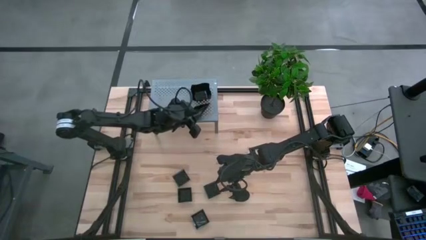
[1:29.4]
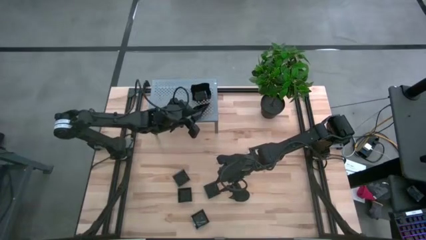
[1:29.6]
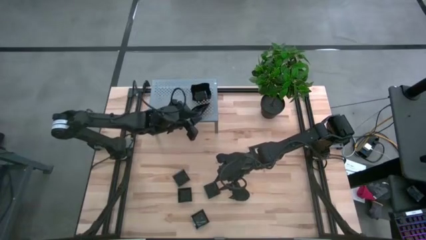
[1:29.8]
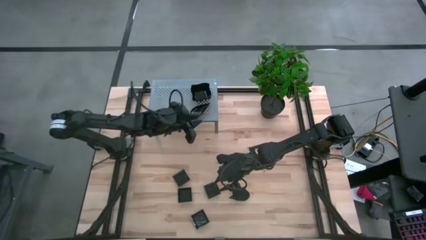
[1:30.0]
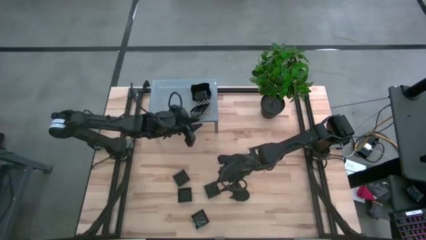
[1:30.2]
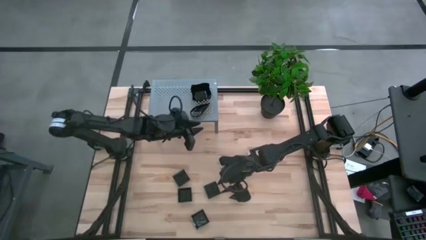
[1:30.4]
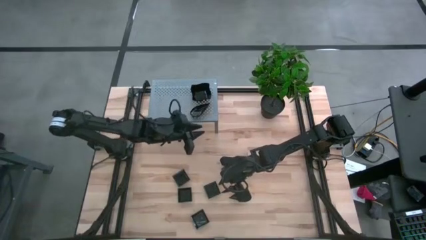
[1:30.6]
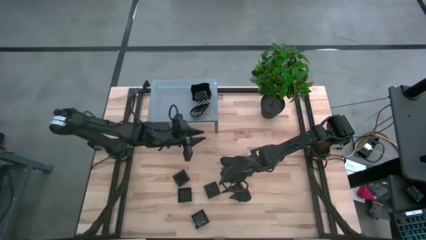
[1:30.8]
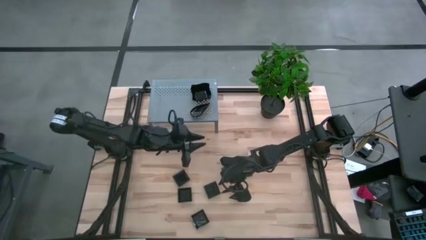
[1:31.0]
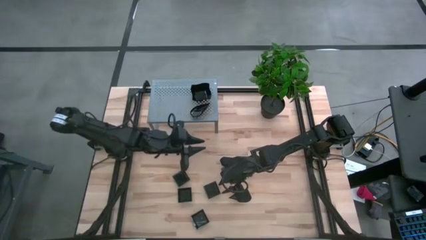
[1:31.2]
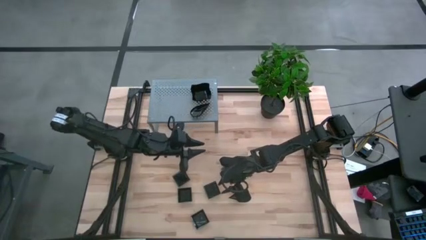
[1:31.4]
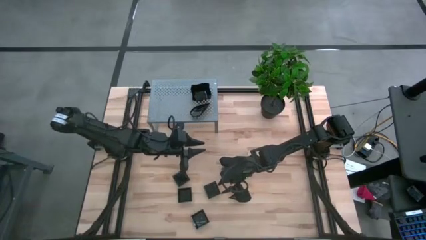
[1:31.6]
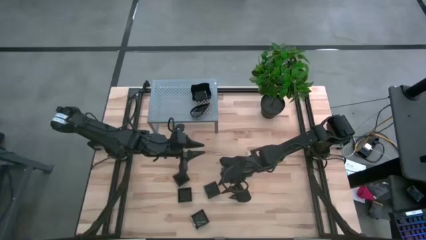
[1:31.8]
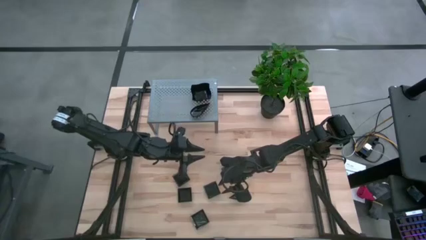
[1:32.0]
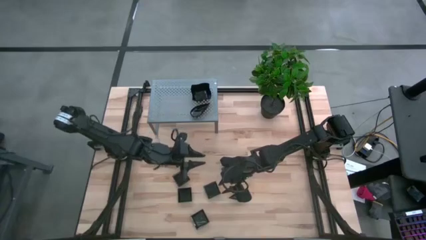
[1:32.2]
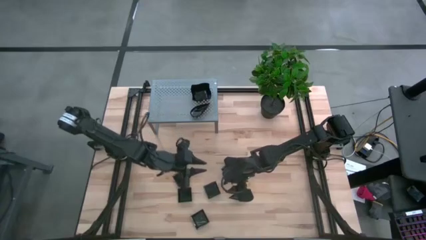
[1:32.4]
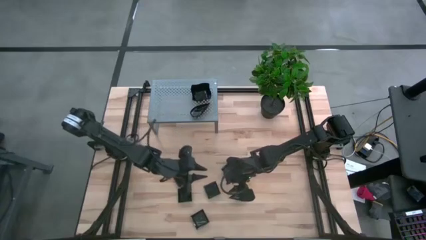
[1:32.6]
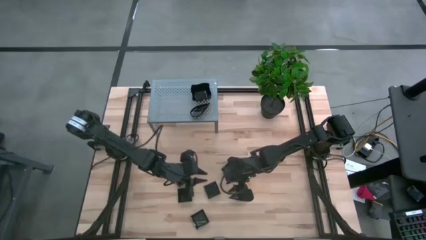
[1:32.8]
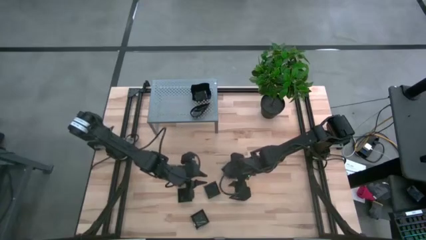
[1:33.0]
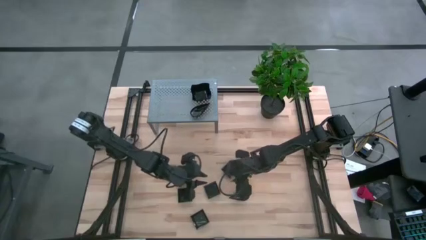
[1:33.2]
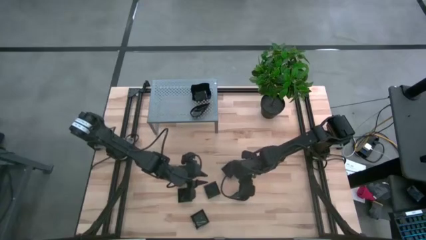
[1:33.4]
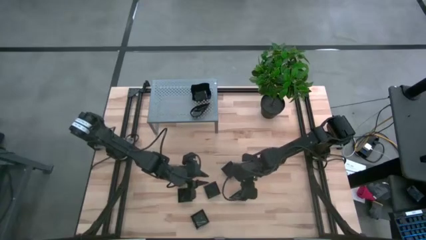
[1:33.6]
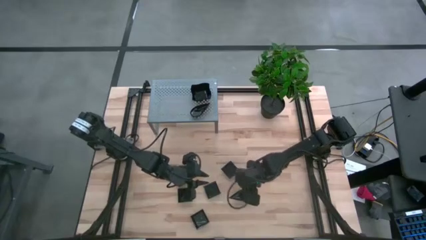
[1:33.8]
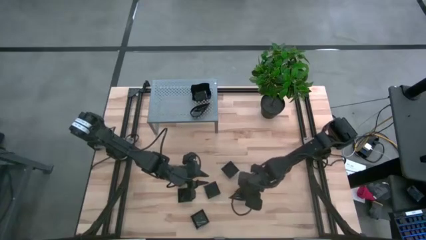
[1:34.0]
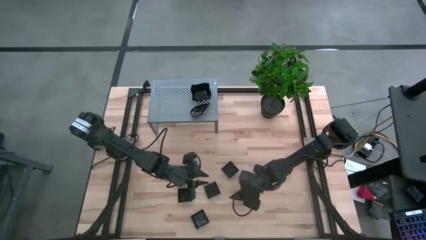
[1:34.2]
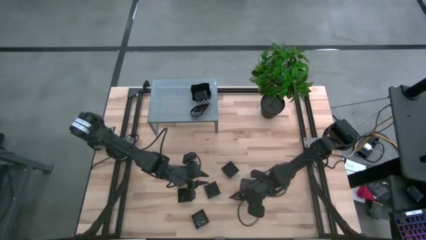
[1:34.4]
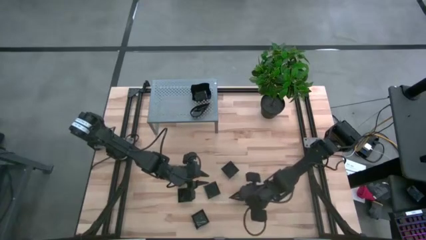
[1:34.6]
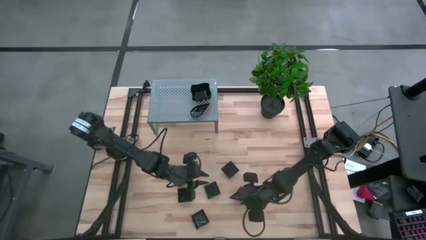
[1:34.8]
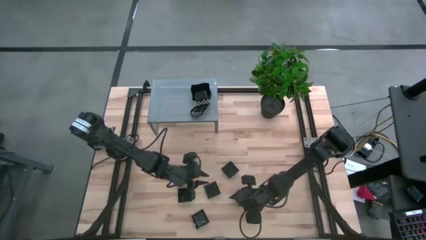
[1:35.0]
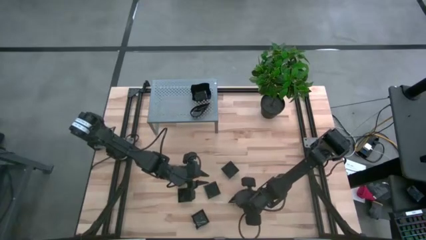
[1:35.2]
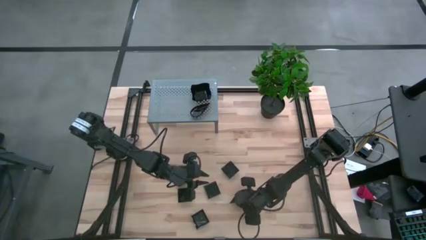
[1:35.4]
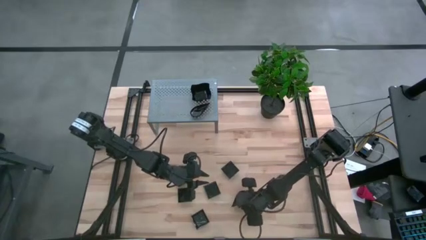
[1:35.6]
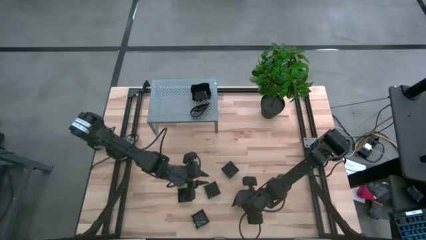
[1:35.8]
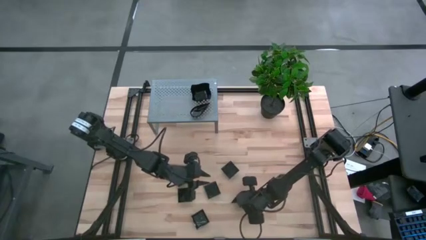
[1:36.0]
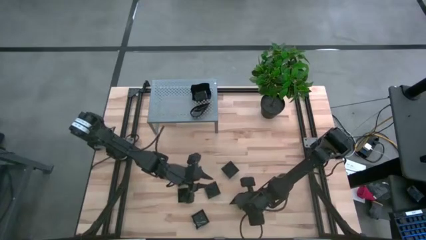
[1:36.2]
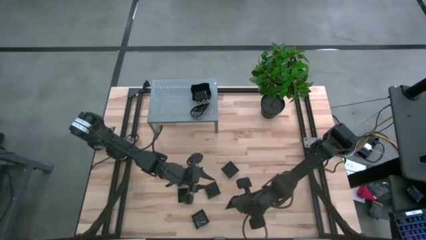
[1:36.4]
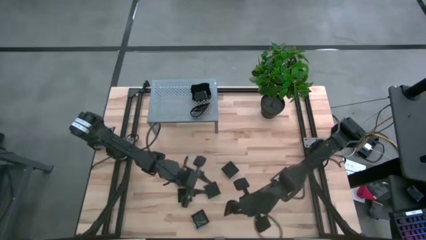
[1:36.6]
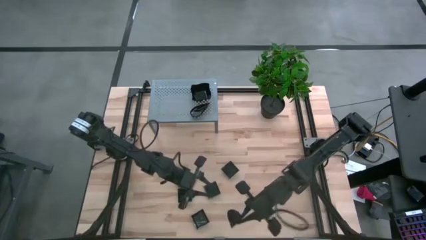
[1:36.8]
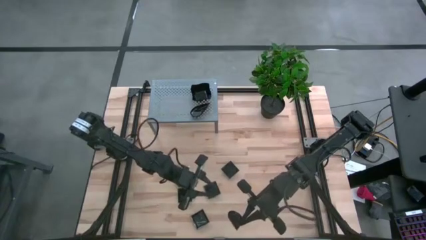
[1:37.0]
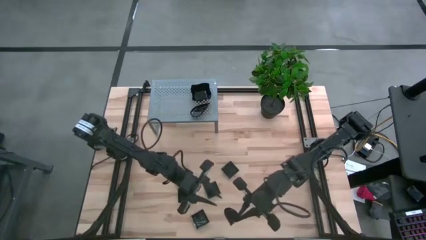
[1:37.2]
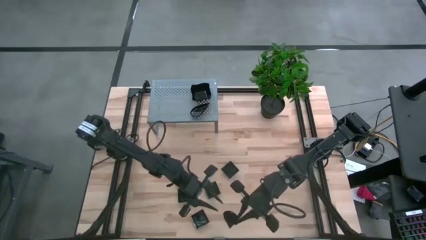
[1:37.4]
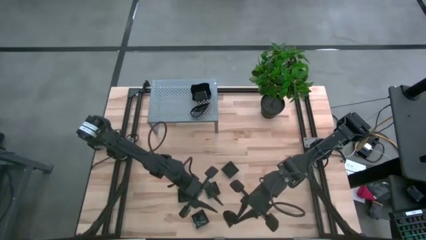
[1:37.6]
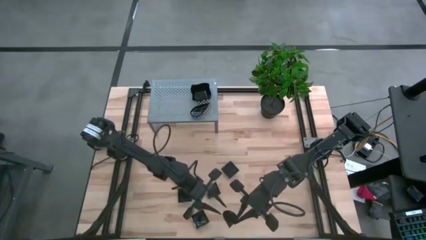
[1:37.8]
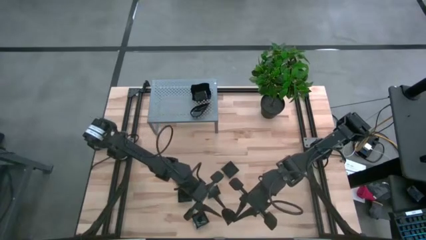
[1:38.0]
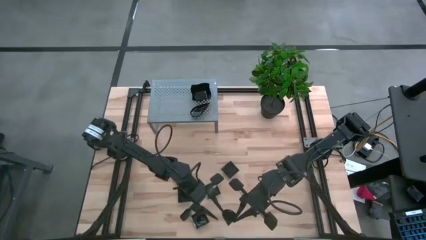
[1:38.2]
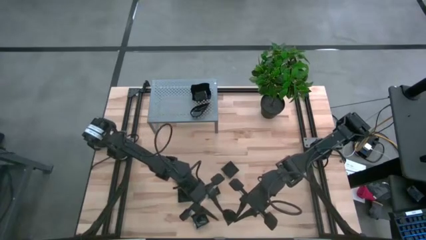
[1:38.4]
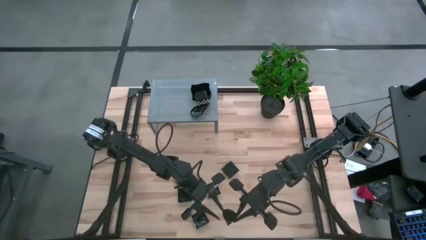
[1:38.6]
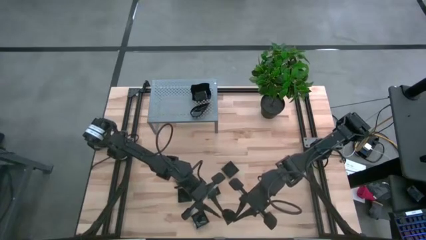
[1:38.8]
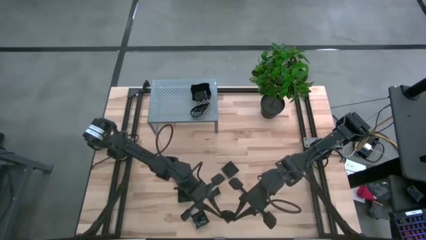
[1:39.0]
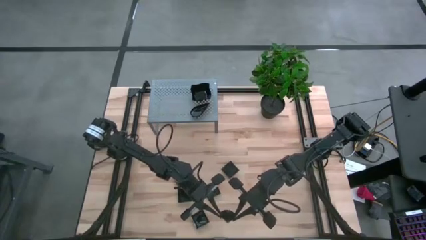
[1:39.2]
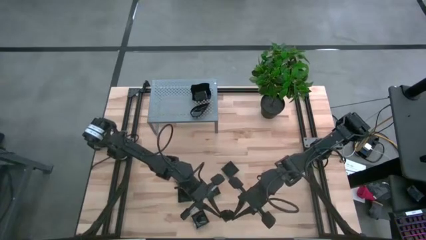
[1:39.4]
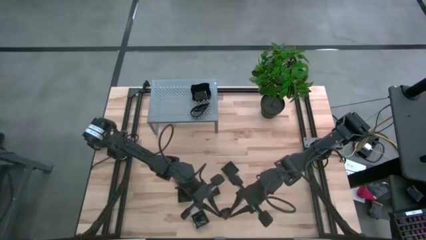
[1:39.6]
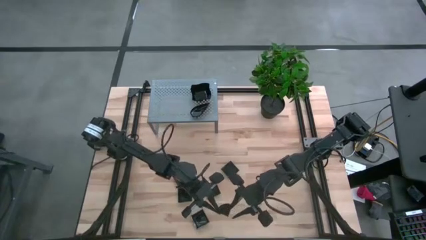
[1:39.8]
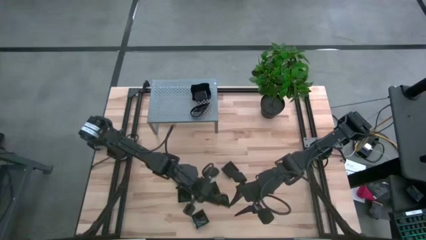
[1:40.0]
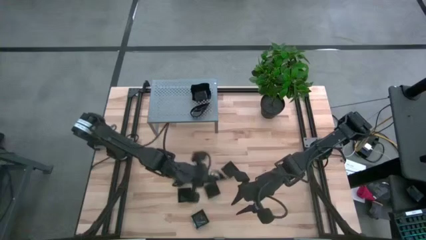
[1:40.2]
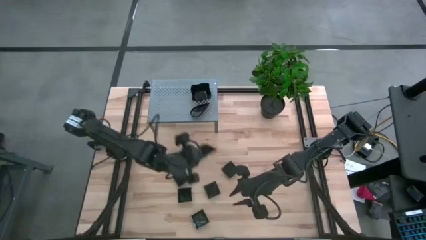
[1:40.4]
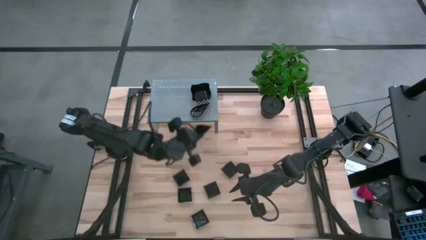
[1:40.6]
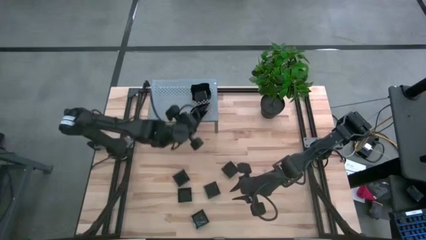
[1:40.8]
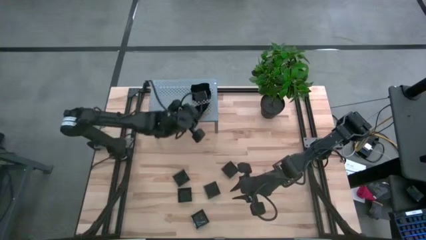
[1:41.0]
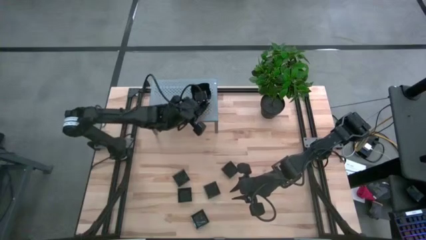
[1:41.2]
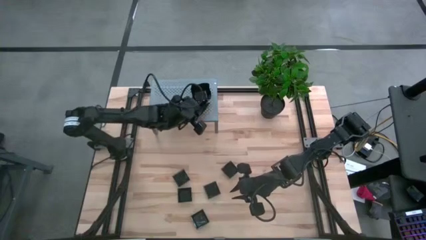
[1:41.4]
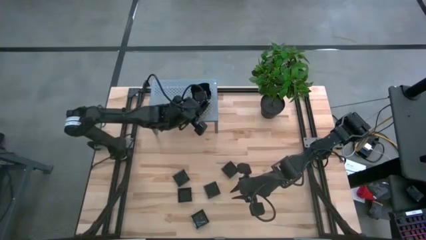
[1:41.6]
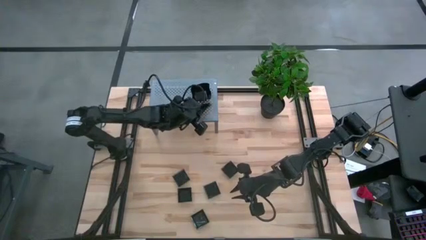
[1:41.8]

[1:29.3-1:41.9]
Task: Pick & Place Mini shaped plates
Stack the drop-shaped plate on top of the stacked drop-shaped plates on the shelf
